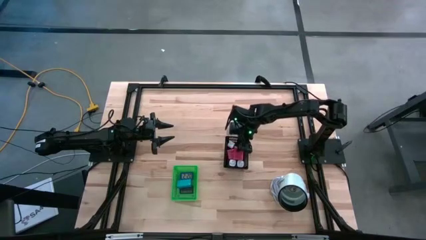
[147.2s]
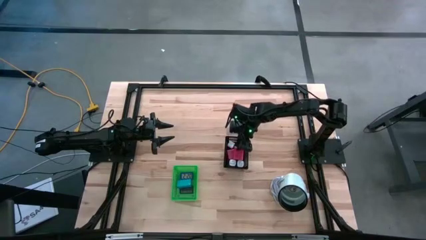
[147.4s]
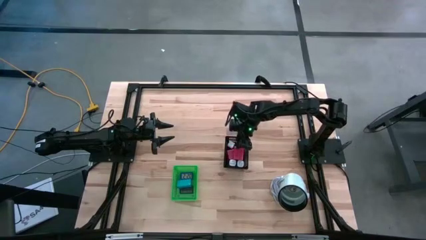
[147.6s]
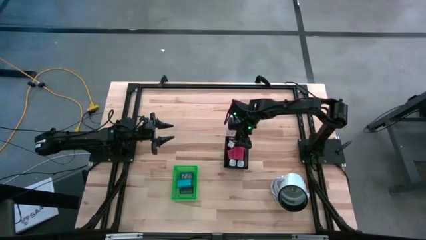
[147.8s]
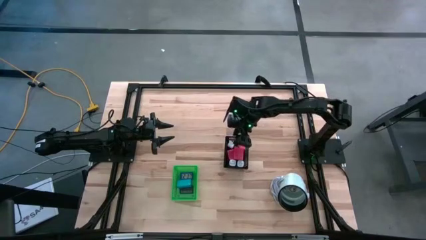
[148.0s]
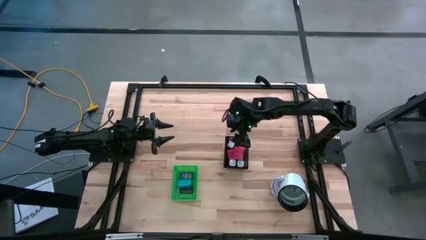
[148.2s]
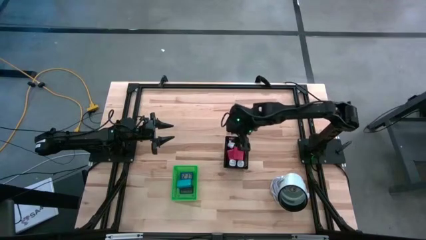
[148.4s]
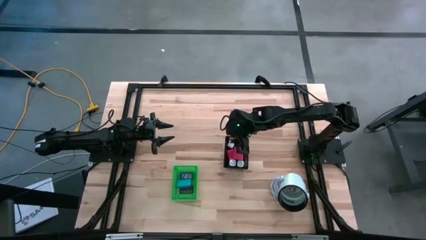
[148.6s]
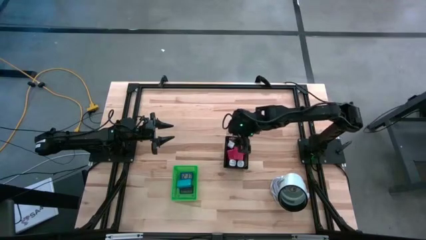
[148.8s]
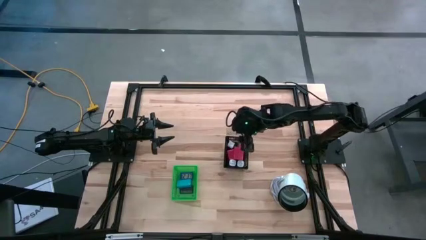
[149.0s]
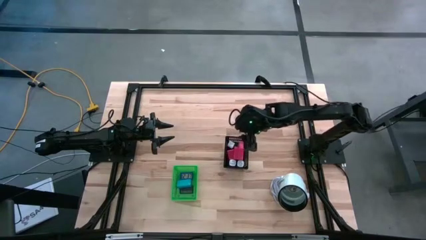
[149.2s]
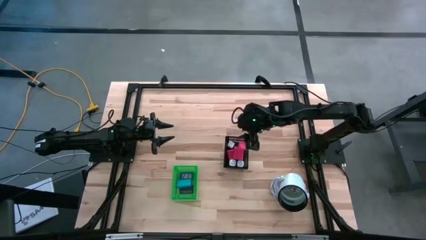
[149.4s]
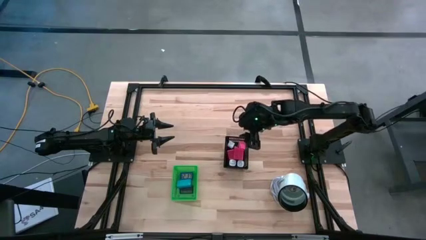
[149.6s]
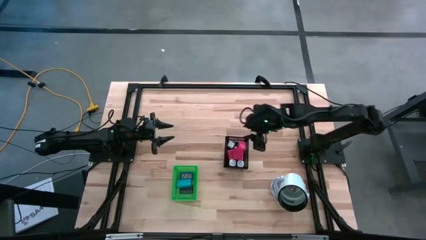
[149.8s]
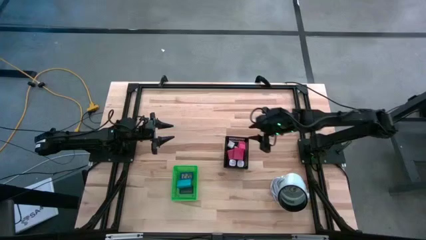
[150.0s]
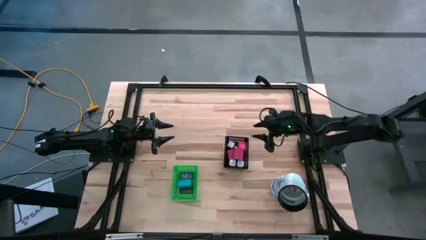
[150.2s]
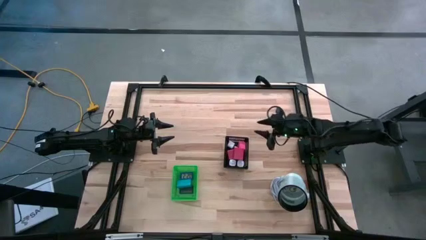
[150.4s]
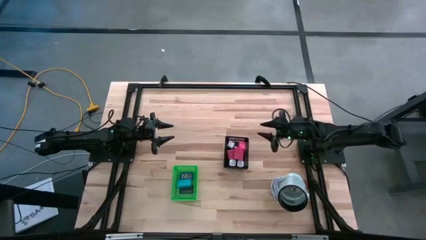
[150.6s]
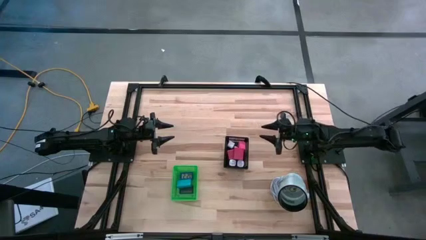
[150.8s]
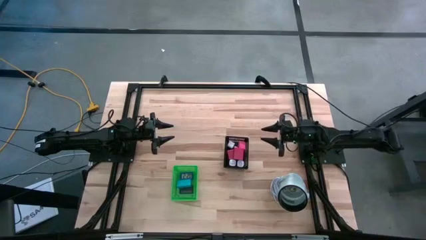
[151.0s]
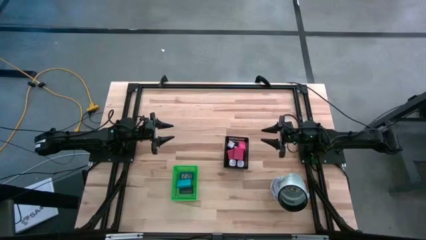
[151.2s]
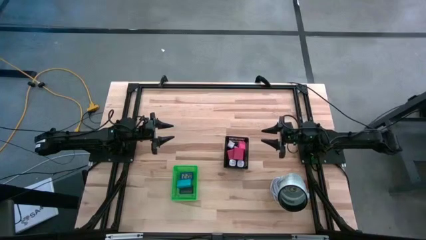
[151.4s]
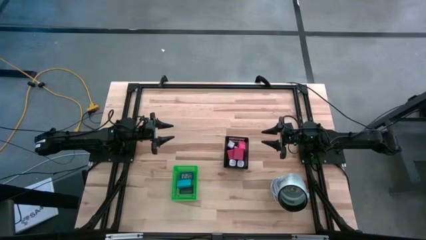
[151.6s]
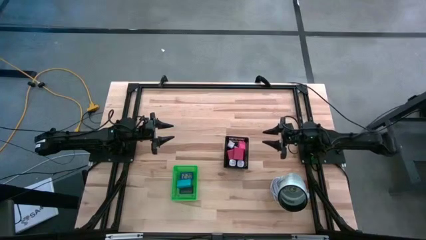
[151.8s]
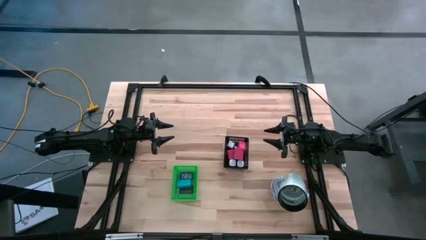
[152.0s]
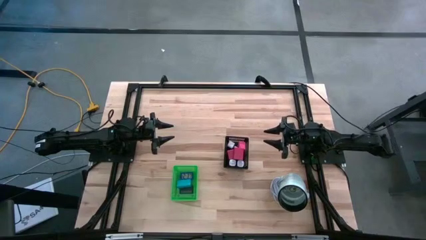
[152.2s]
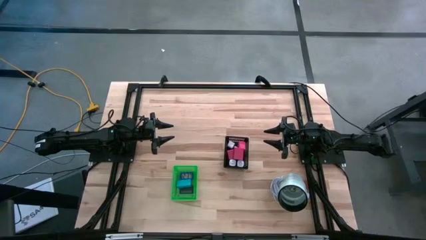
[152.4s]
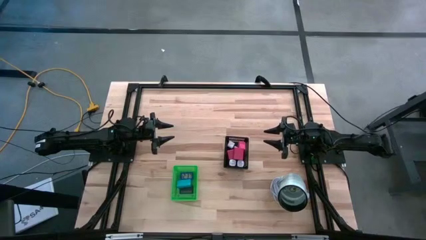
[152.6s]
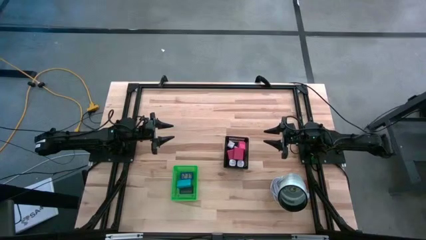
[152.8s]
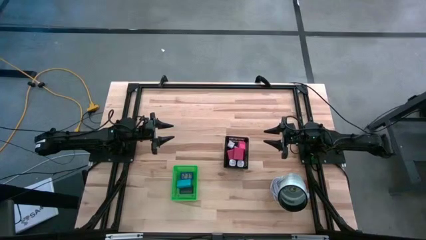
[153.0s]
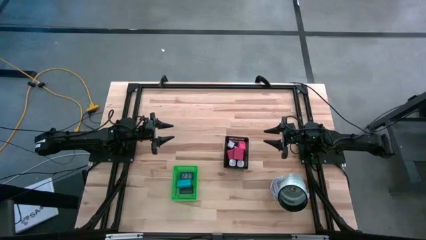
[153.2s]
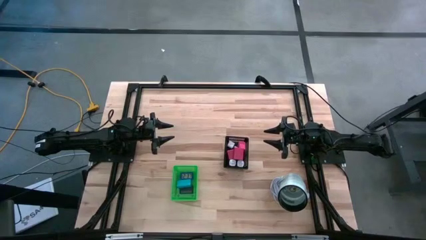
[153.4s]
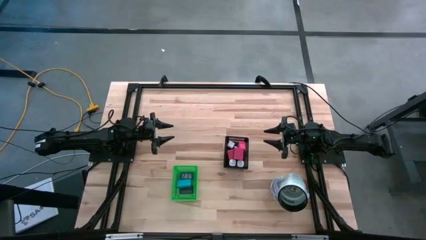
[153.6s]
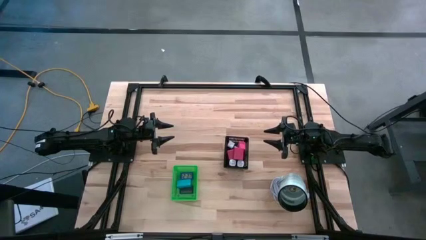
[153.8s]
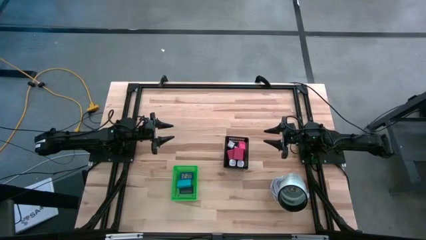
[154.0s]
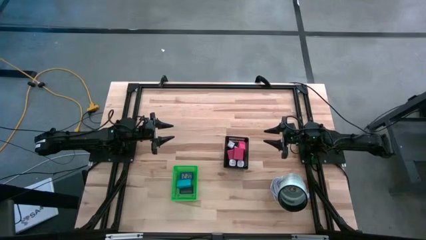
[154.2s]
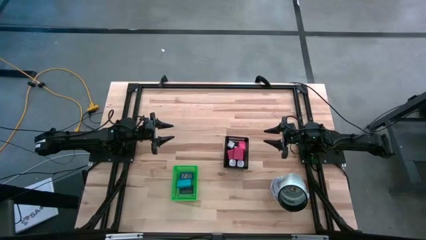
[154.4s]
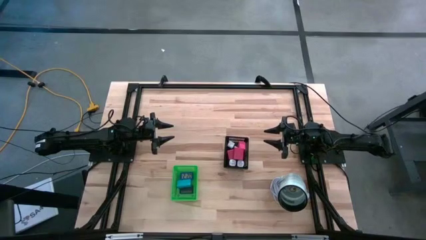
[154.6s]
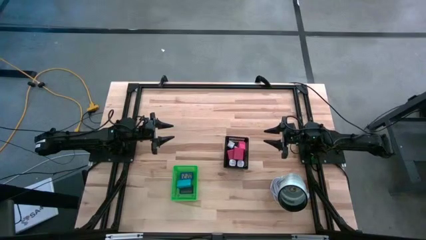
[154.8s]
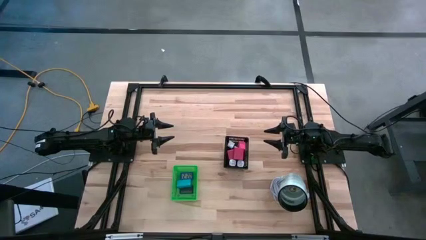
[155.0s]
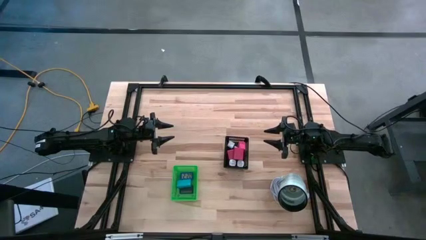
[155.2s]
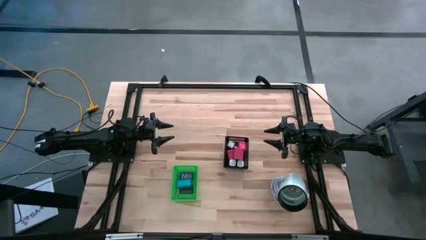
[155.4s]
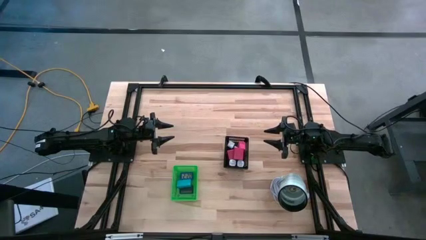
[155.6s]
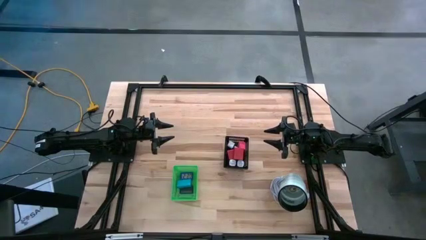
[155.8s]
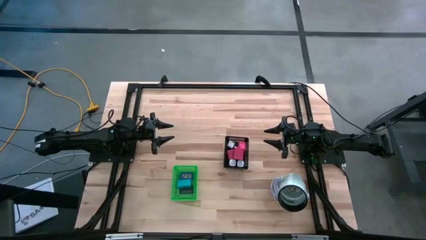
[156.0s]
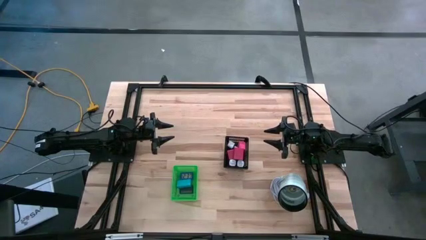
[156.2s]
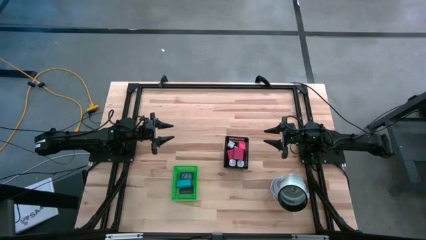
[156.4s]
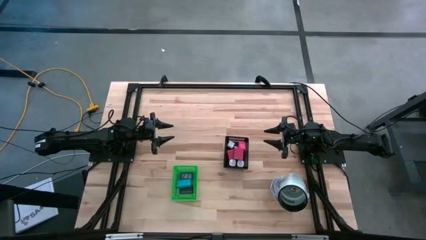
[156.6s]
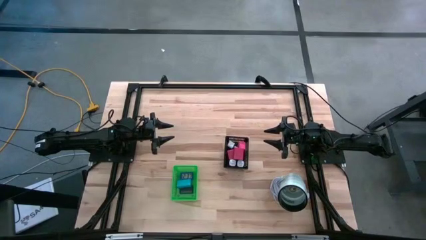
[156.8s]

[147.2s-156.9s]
Task: Pick & Place Office items
Return to Home Position

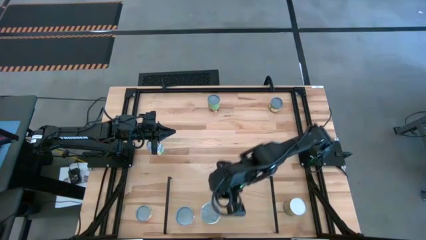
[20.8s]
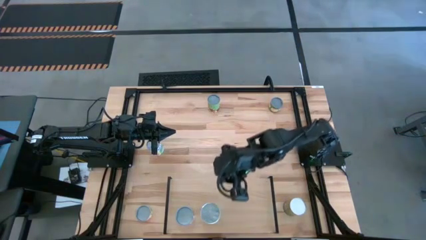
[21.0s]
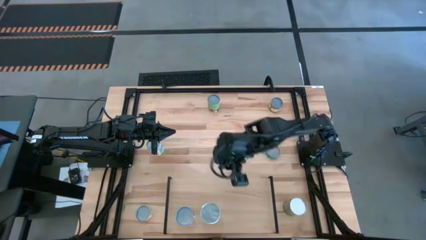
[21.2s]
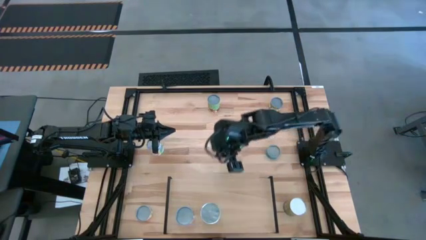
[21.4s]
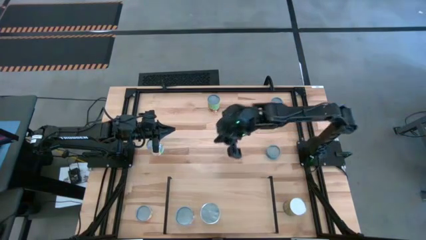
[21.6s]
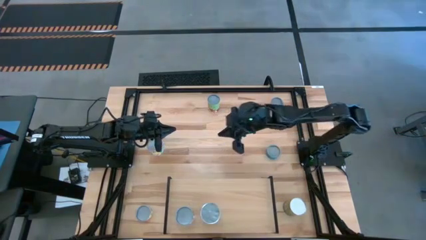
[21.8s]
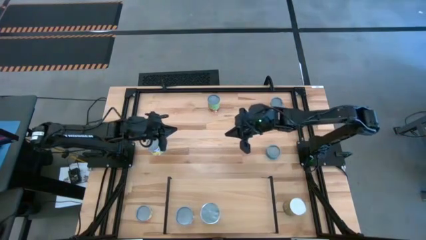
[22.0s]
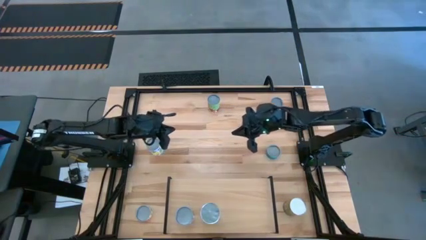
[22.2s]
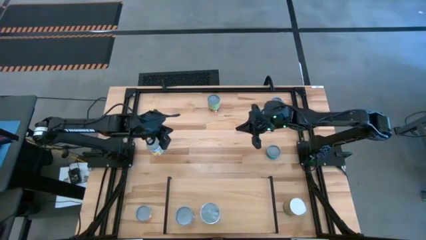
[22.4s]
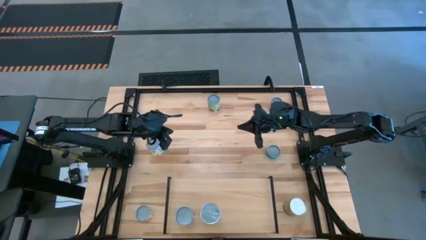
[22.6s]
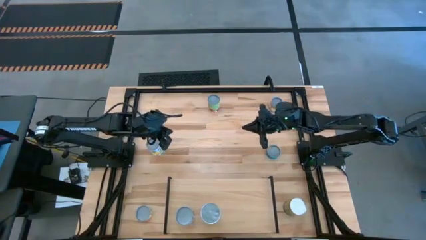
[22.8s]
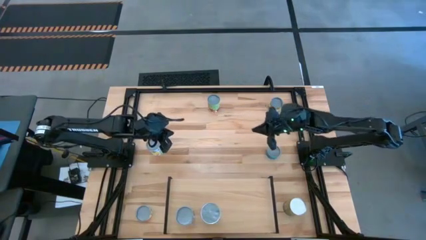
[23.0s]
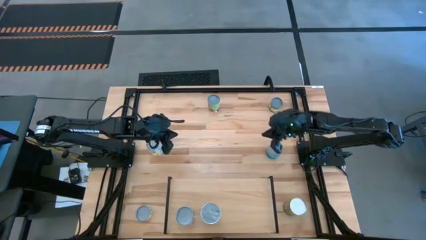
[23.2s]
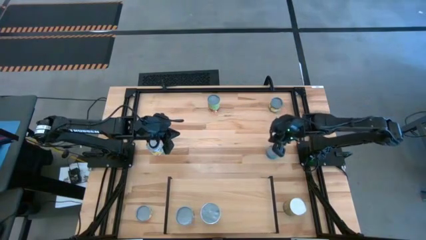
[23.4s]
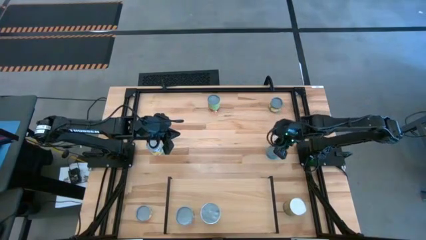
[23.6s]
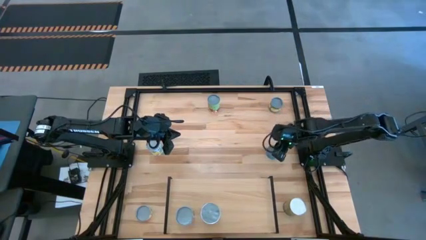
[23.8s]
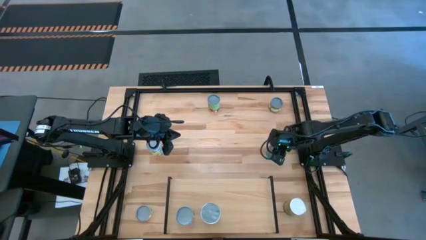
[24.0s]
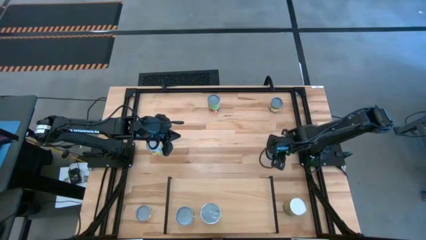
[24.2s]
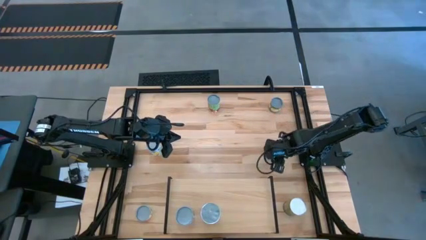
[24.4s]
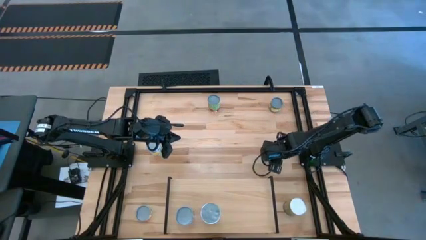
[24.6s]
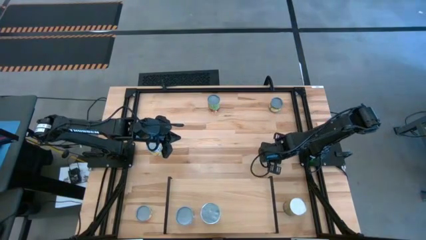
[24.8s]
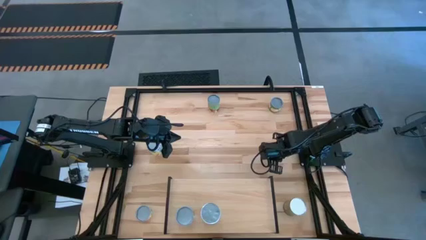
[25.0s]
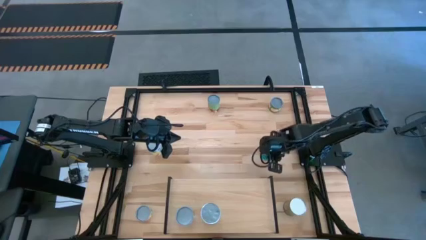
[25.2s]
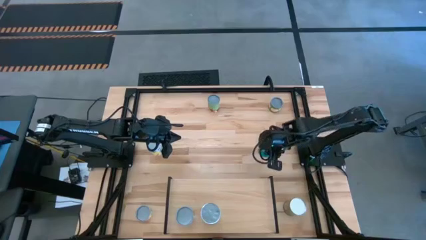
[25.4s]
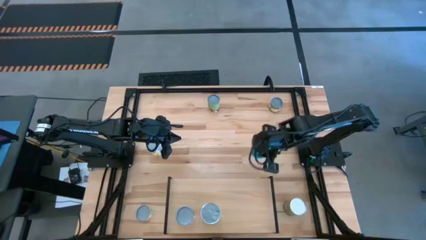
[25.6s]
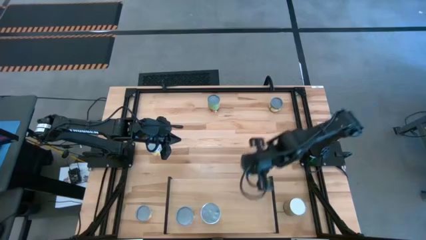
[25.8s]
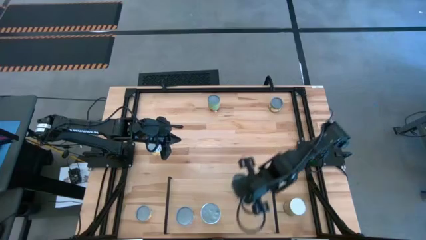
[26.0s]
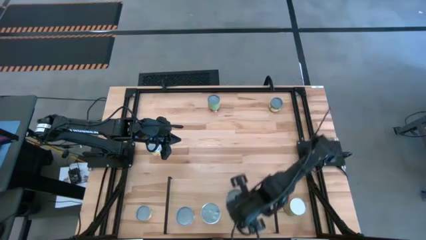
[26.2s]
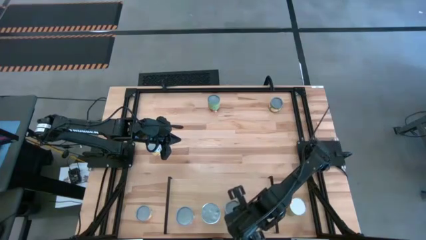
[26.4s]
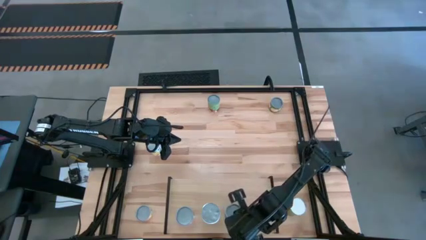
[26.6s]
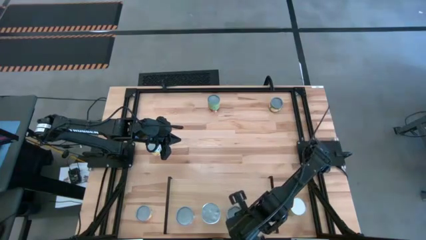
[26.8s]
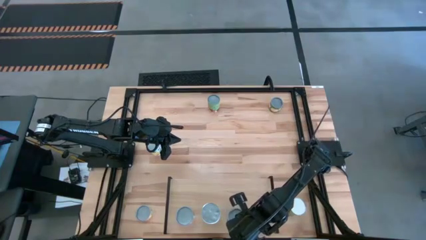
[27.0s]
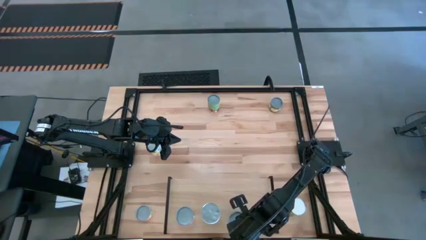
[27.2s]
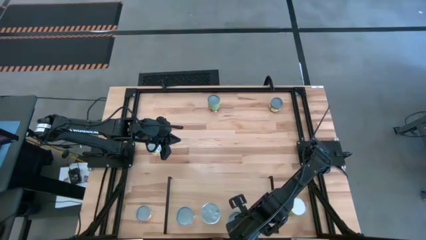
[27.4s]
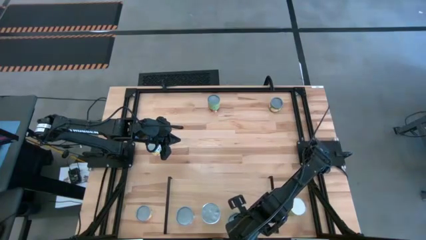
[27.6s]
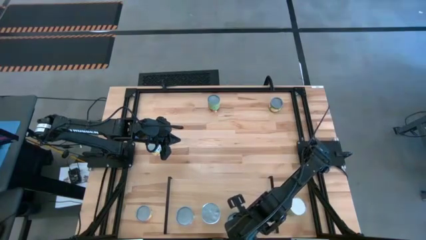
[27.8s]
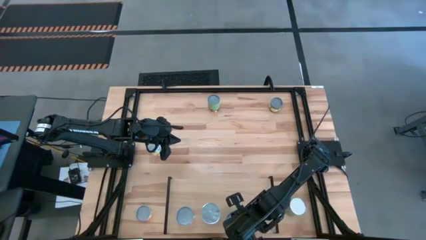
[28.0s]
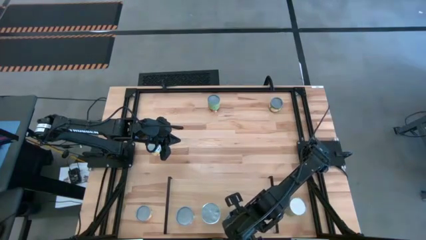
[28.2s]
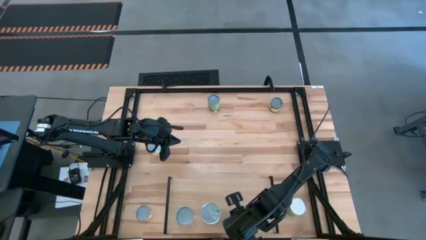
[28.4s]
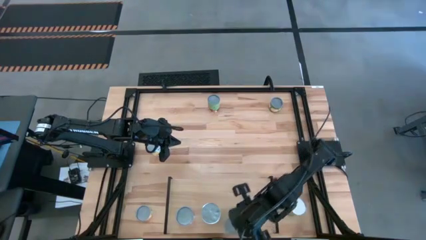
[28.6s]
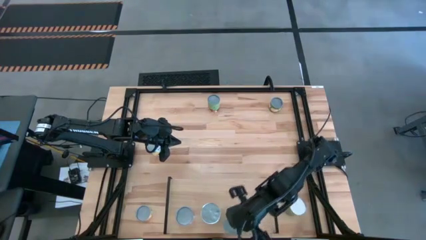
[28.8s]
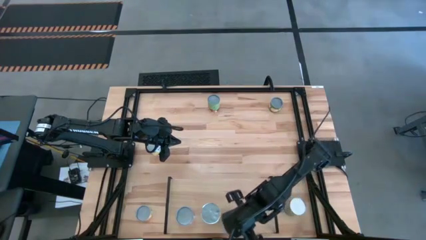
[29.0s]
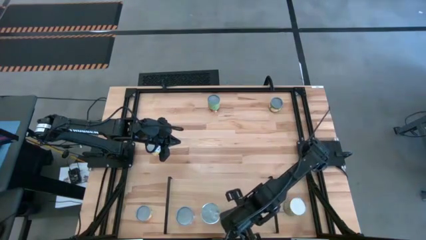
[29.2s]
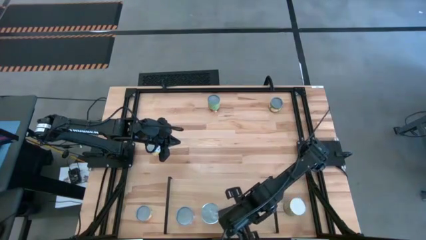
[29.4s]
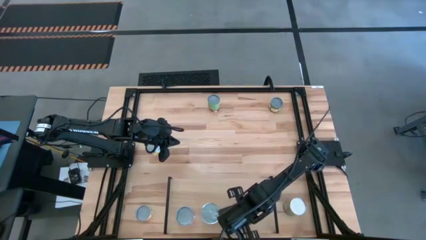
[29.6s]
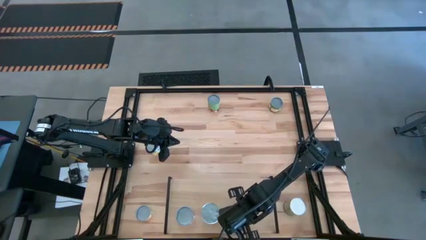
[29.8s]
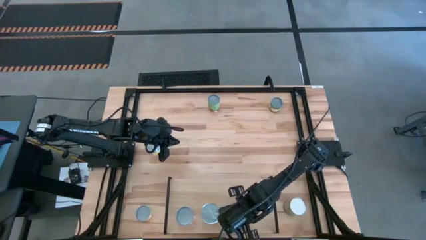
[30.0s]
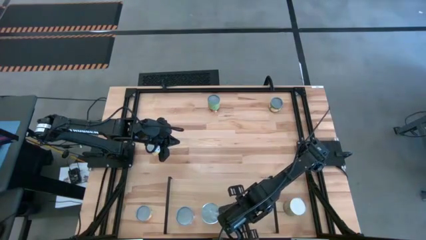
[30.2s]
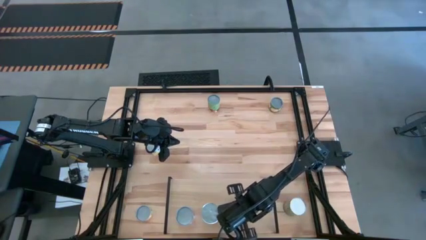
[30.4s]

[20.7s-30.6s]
Task: Pick and place cans onto a shelf
Put the blue green tuna can on the shelf
